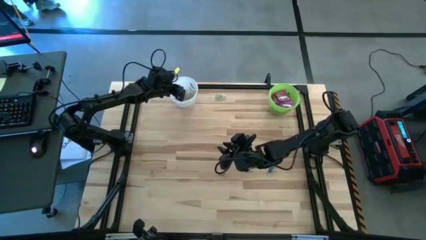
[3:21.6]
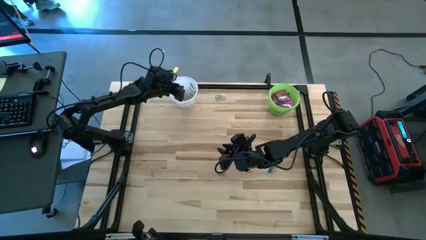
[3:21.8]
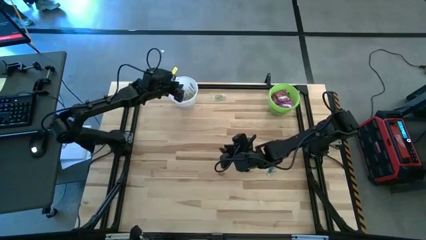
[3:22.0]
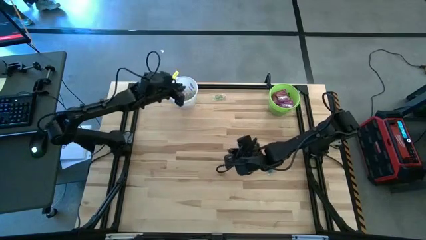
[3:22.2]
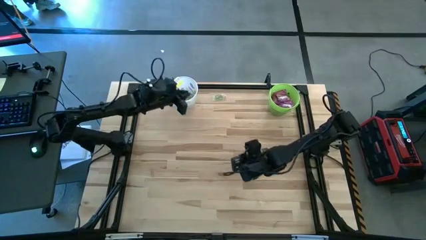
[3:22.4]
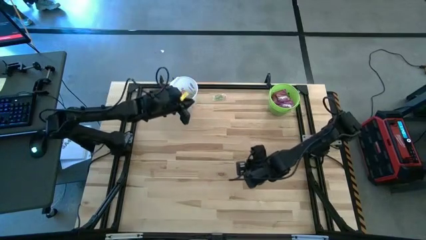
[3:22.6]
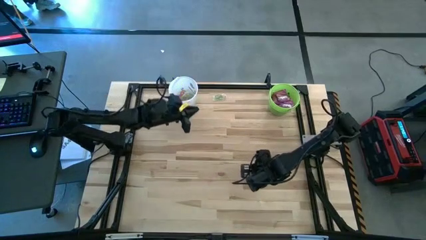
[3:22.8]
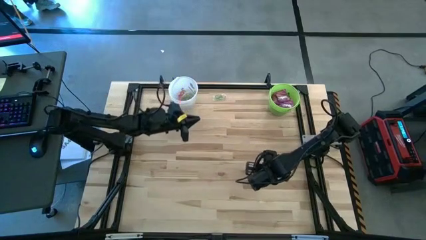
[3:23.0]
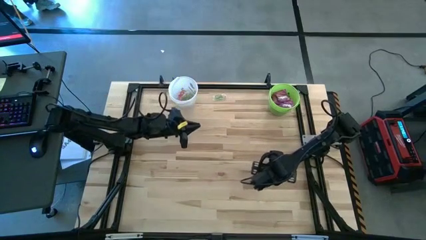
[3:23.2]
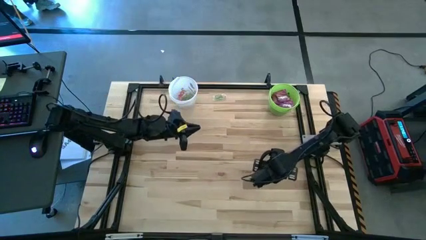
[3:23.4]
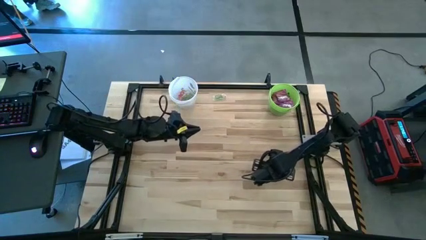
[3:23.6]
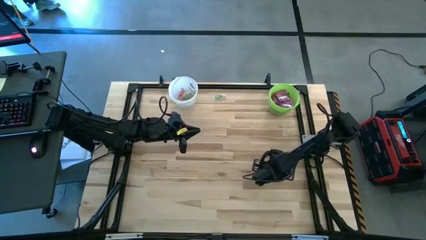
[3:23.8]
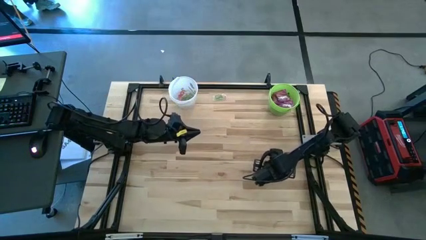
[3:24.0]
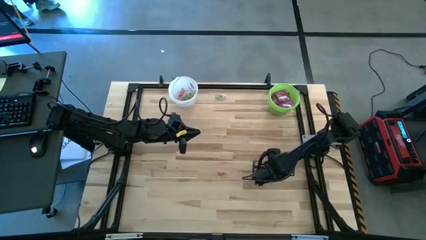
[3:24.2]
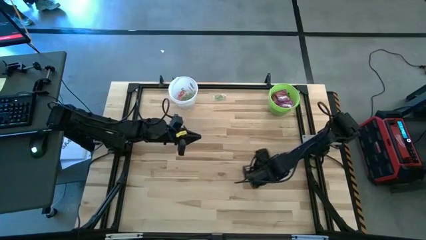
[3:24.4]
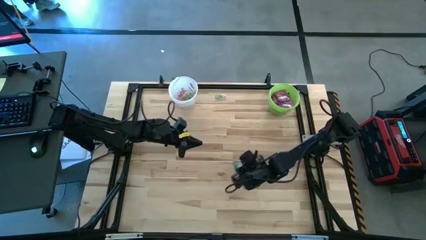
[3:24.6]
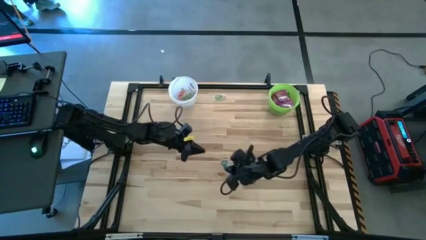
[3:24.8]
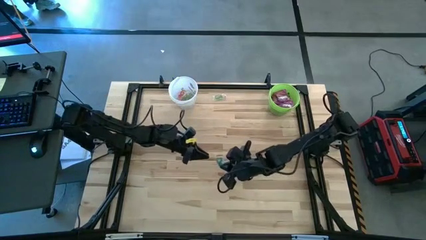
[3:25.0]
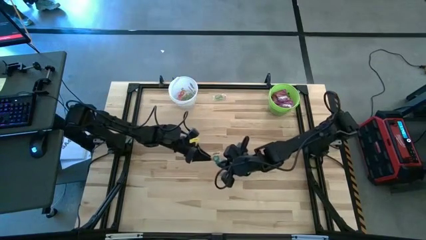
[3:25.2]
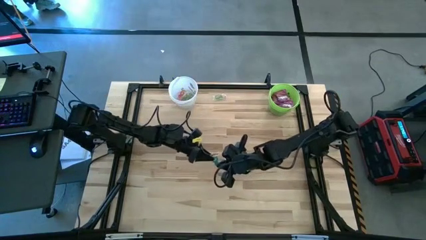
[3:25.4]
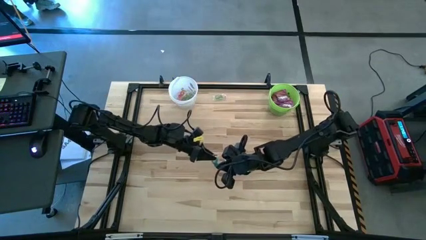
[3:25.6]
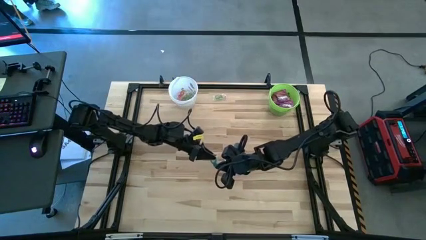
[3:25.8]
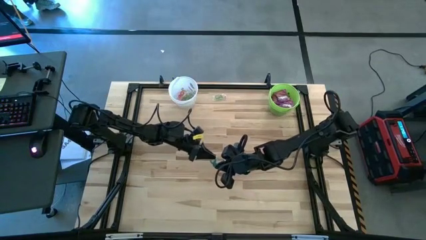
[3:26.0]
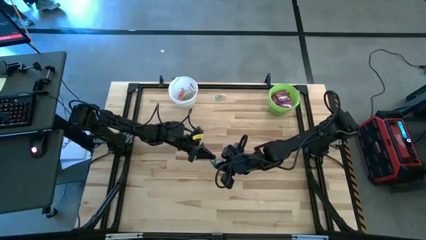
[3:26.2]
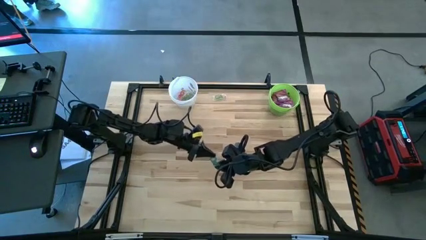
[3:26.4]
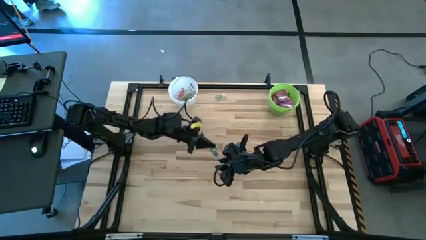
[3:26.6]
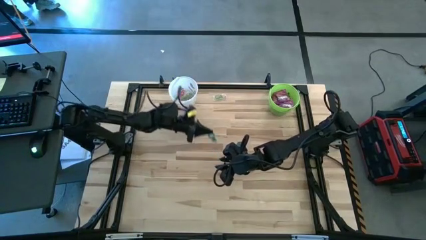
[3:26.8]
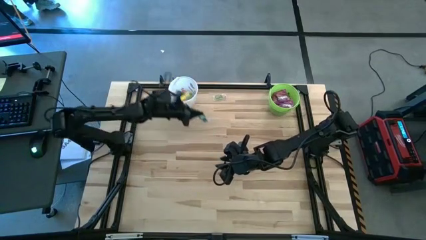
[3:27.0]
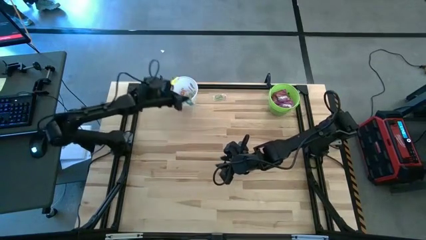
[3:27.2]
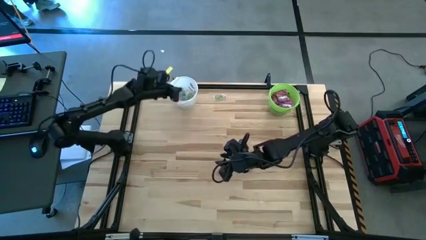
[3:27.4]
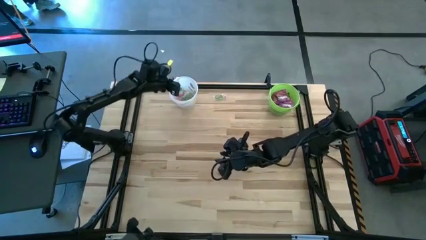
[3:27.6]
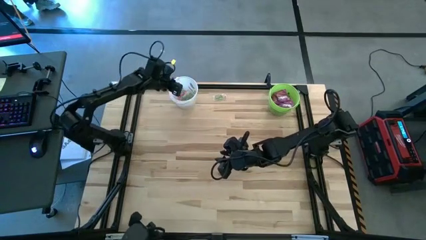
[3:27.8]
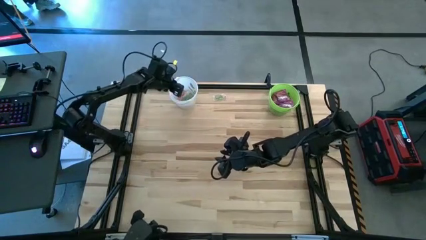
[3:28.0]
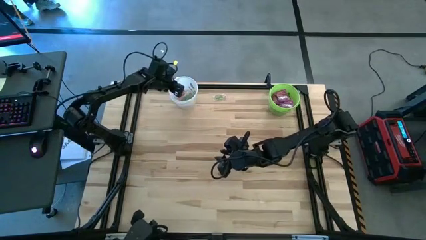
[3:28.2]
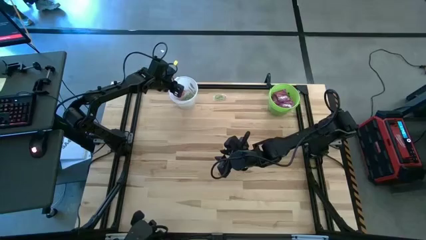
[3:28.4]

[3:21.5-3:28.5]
Task: Sort candy by brand, put in halloween buckets
Put the blue gummy into the white bucket

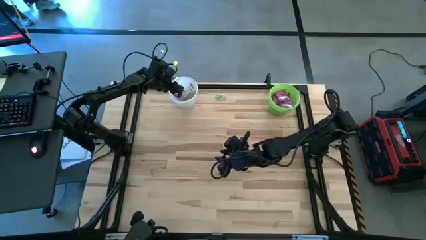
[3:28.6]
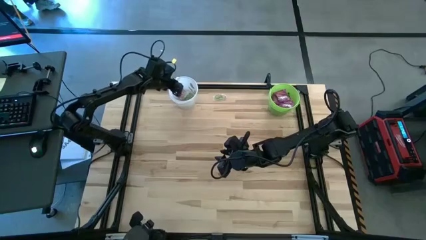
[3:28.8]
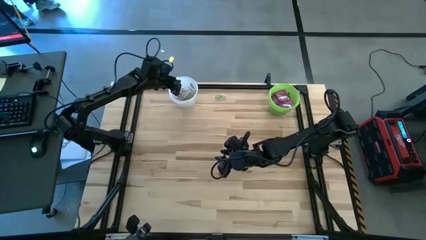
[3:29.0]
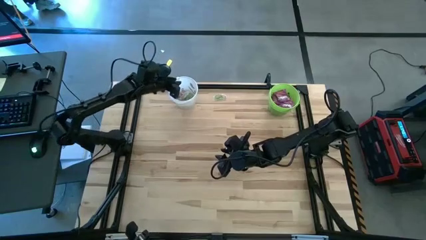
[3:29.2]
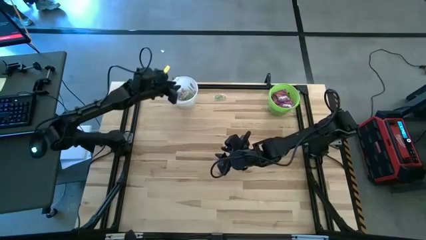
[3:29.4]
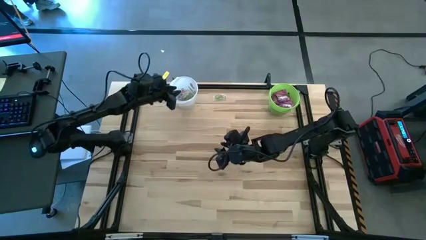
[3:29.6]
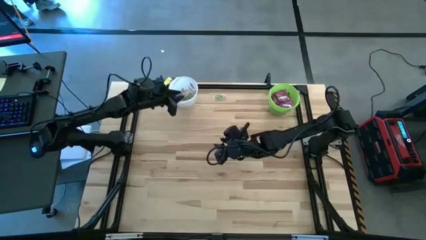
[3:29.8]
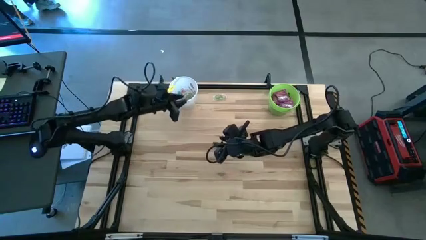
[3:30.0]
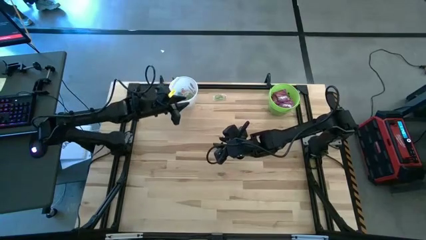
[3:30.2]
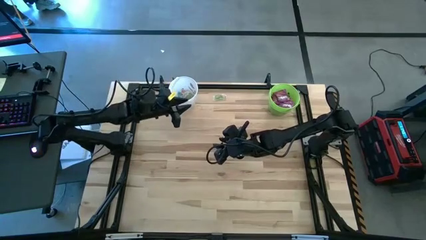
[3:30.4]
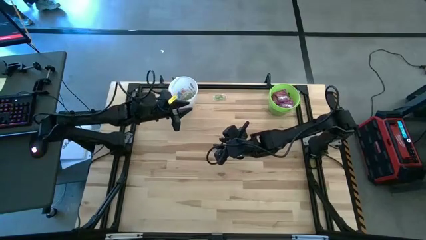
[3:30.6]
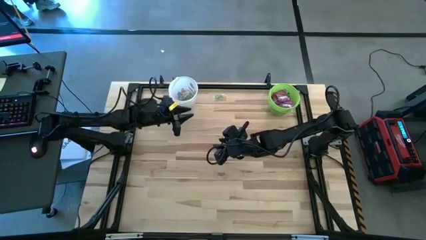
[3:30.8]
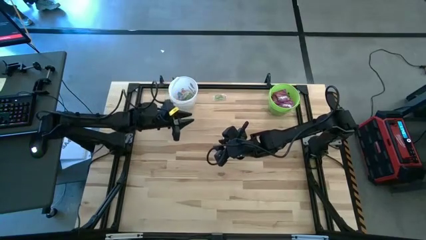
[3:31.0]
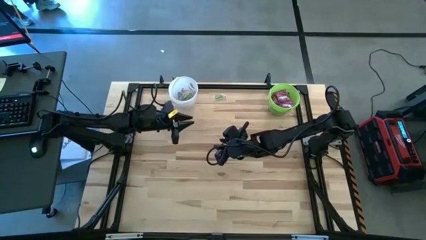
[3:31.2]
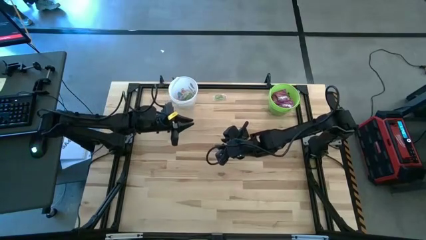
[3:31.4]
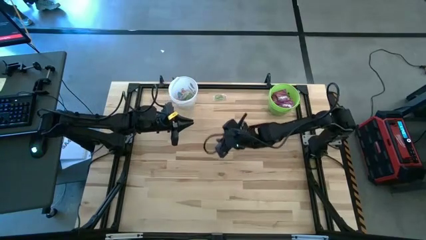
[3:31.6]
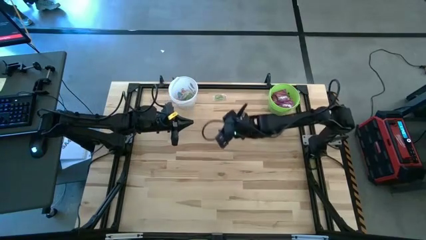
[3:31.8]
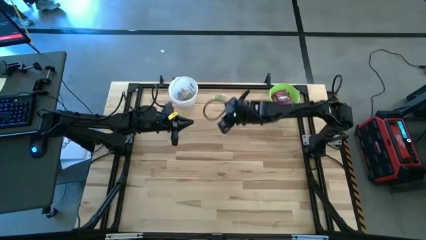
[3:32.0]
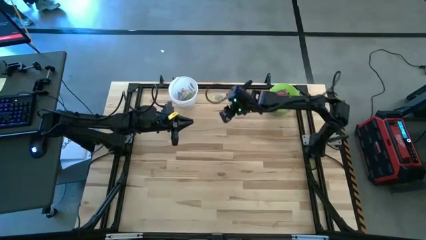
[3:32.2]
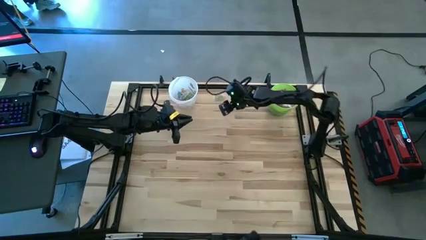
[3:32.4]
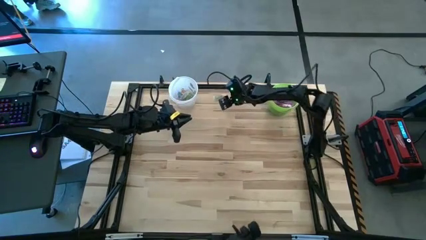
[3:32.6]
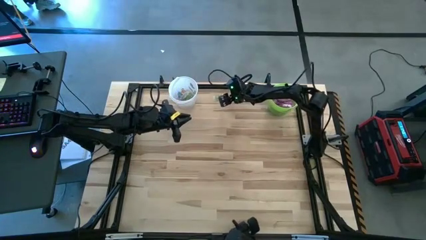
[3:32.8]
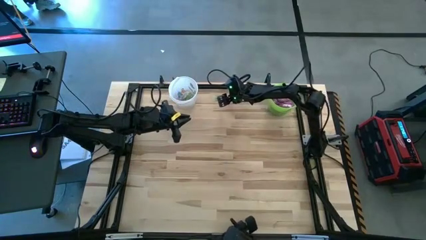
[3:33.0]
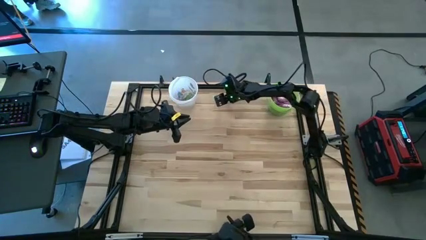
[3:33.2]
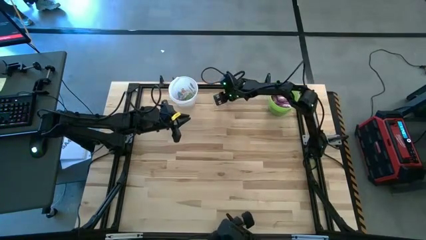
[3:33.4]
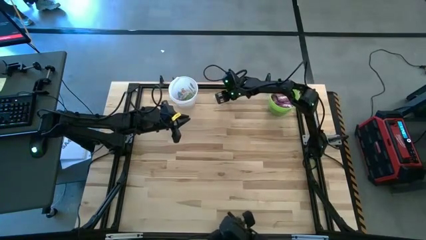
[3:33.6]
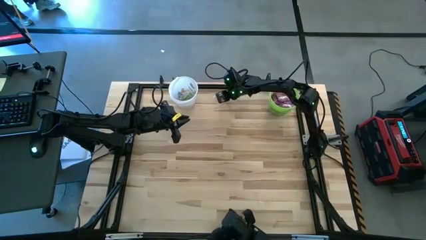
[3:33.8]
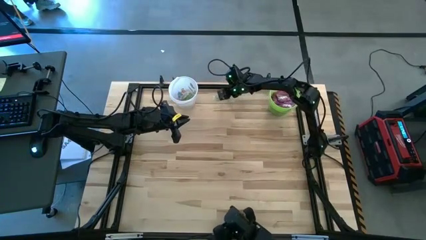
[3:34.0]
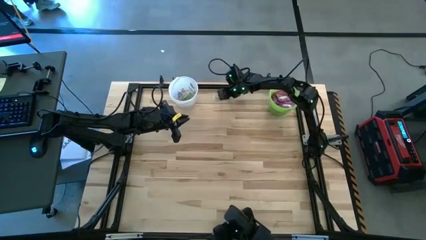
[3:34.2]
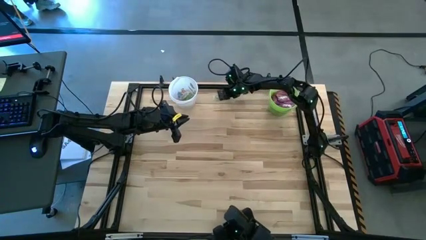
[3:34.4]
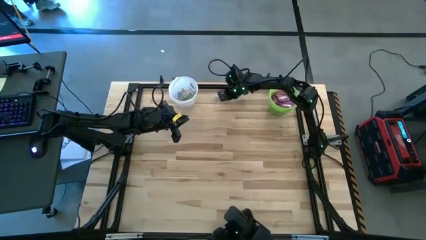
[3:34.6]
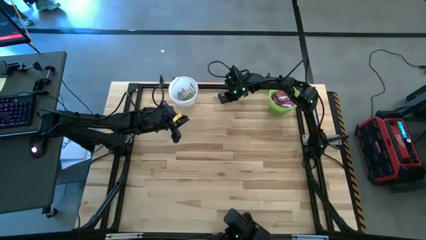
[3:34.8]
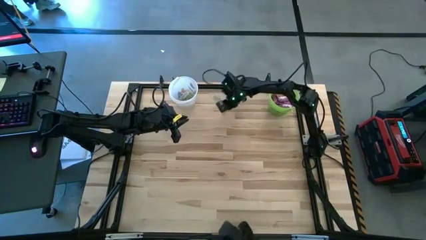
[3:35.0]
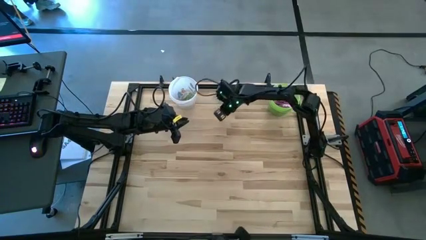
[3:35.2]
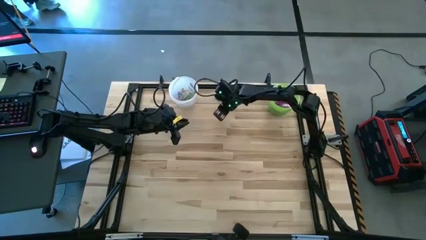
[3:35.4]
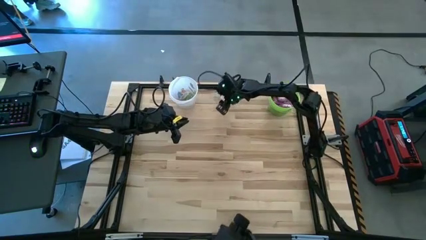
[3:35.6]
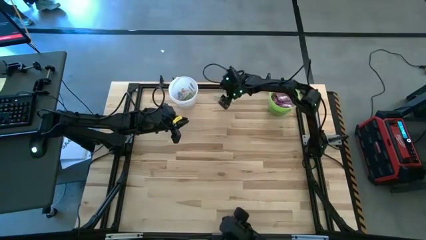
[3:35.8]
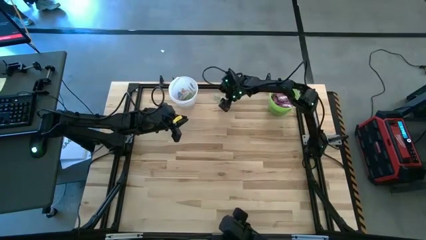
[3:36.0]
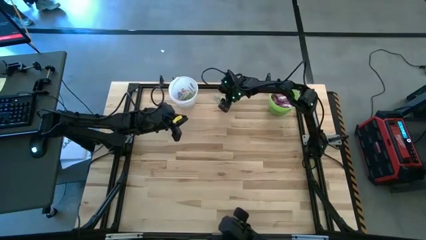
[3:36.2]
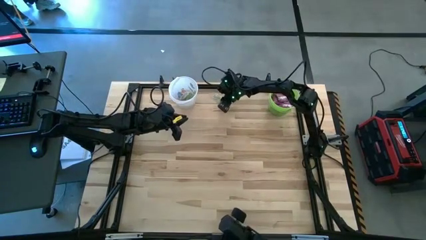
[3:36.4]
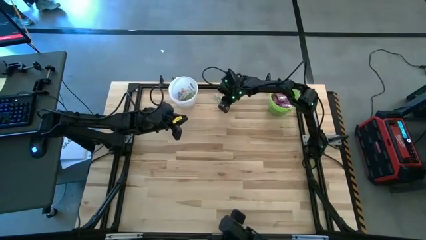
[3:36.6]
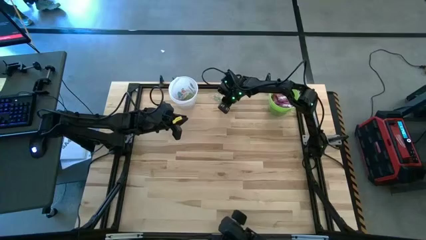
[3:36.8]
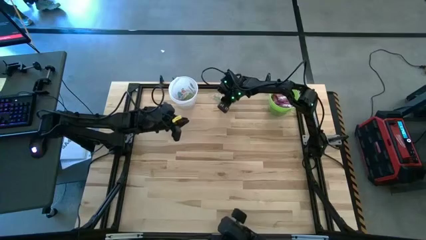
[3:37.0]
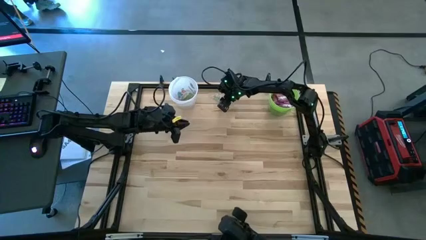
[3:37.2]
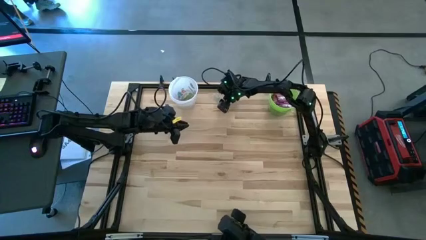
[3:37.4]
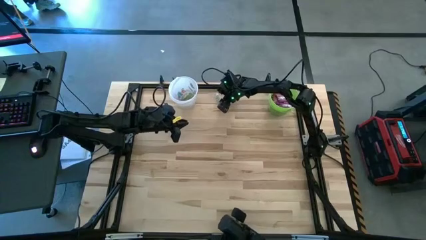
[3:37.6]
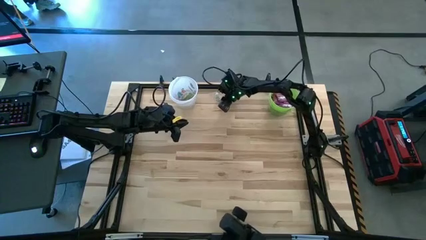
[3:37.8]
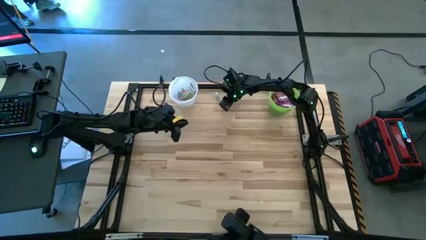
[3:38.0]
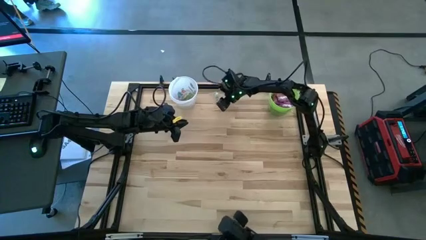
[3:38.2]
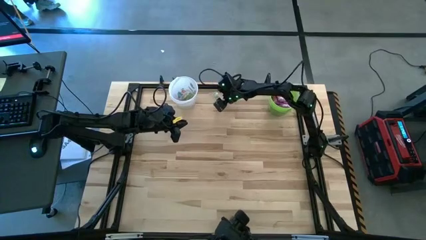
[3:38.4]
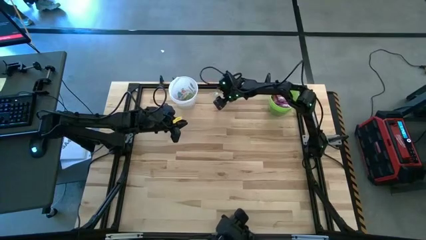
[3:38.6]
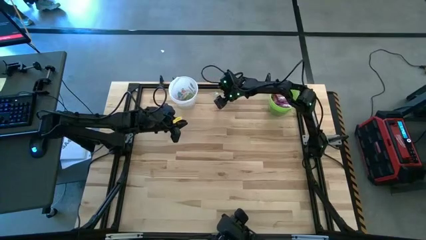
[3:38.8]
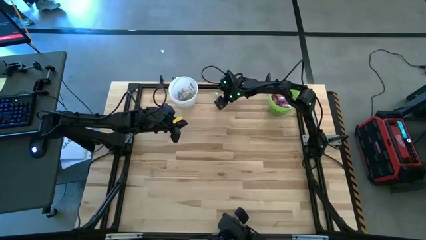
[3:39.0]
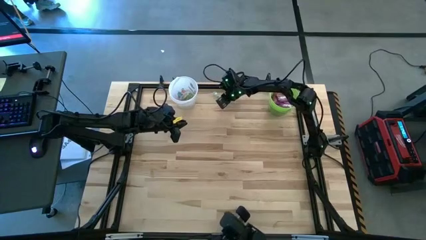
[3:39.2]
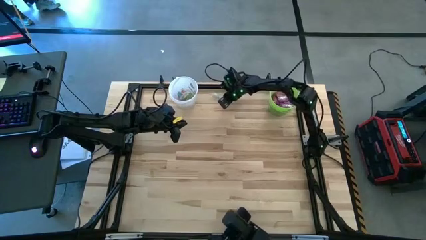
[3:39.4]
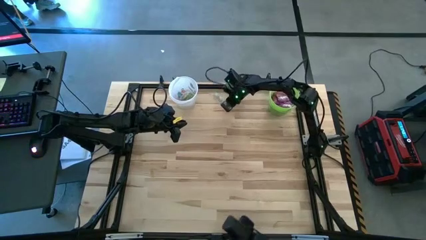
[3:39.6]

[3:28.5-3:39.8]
Put the green gummy into the white bucket
